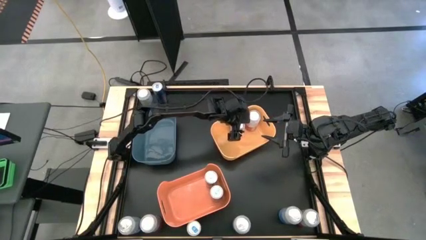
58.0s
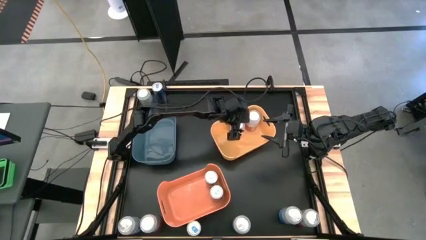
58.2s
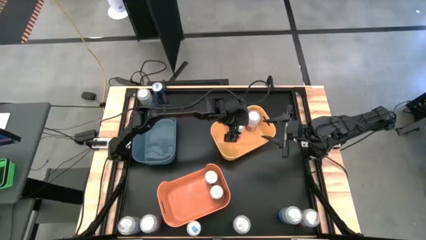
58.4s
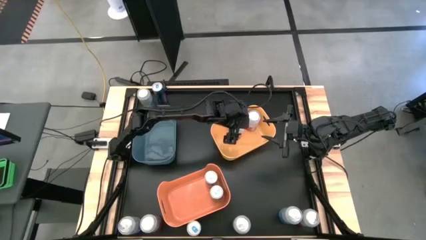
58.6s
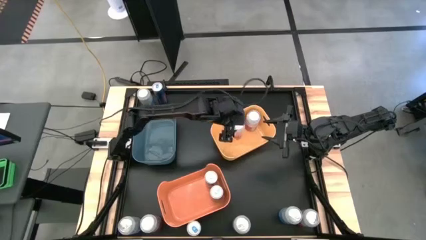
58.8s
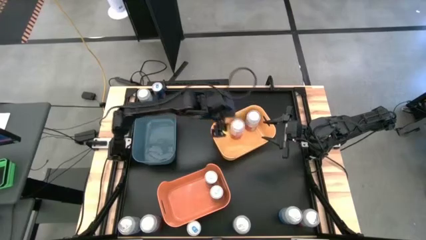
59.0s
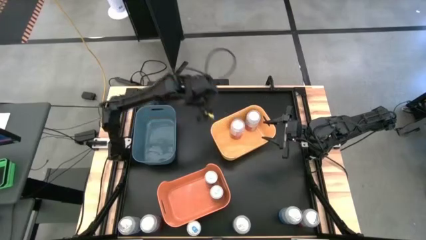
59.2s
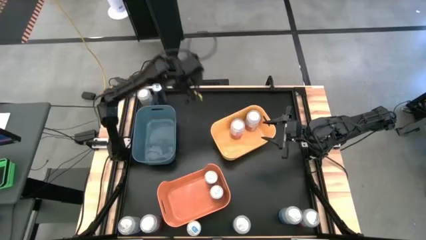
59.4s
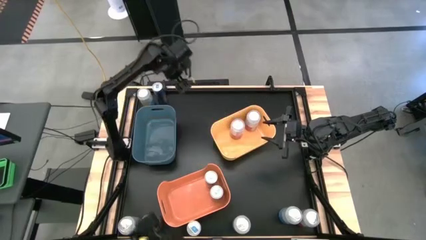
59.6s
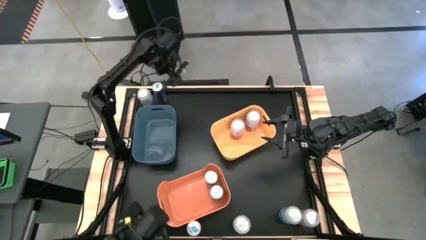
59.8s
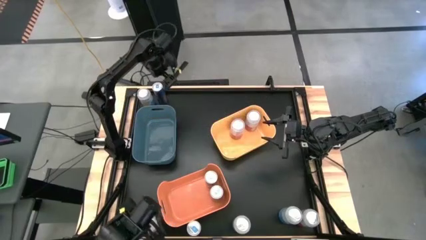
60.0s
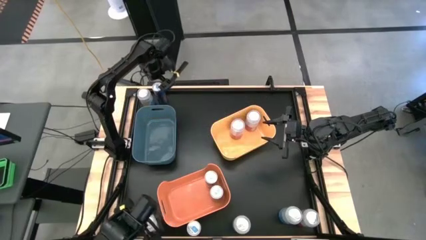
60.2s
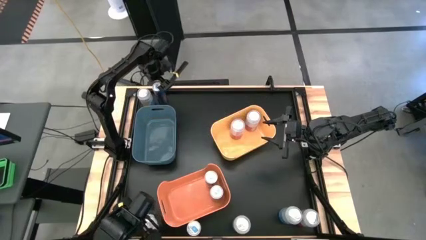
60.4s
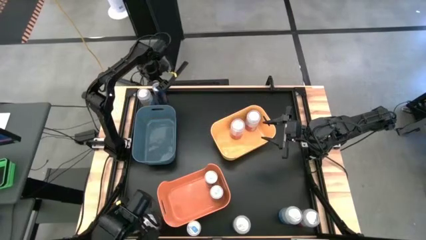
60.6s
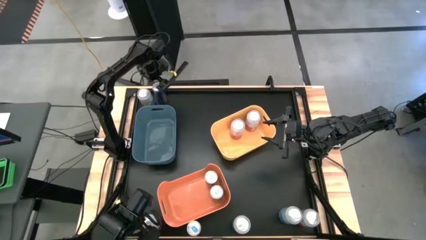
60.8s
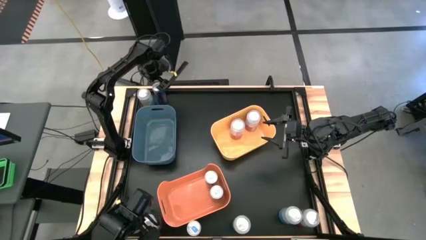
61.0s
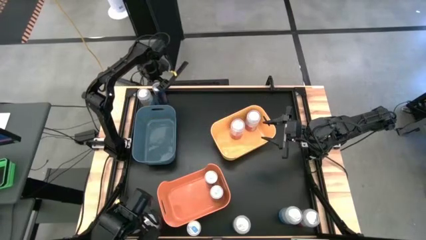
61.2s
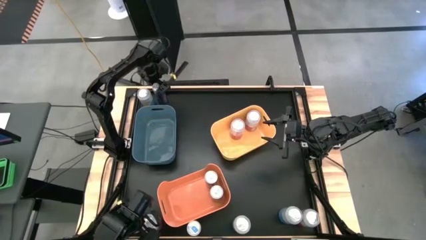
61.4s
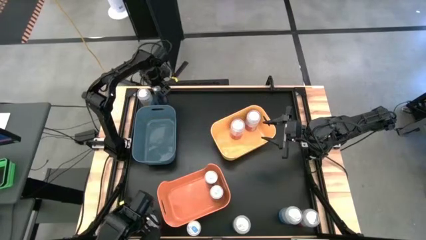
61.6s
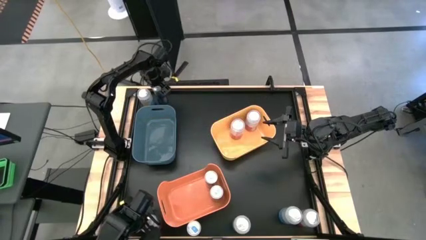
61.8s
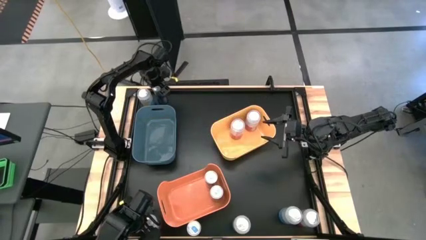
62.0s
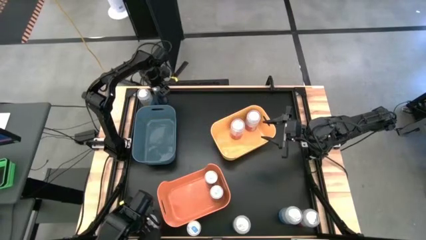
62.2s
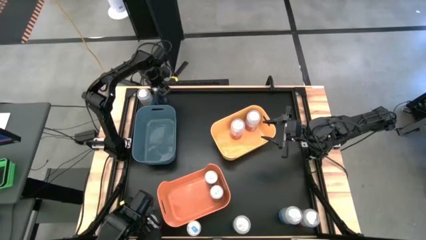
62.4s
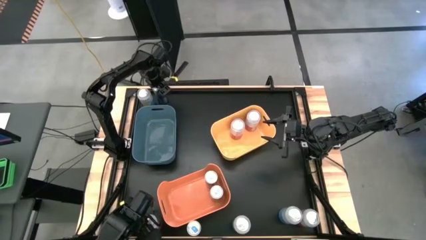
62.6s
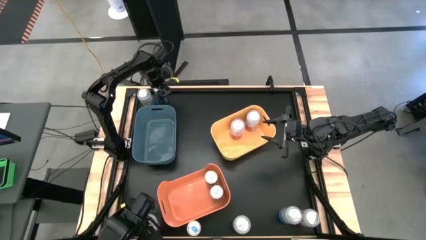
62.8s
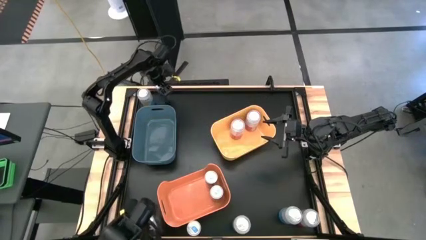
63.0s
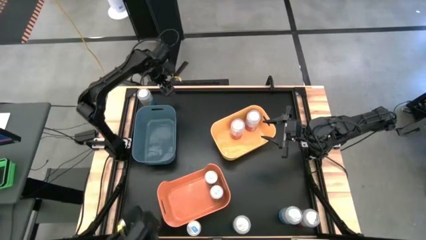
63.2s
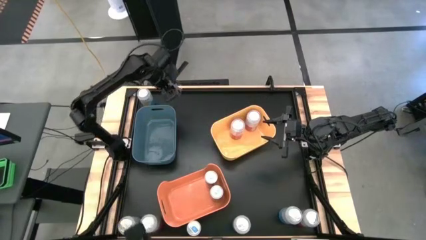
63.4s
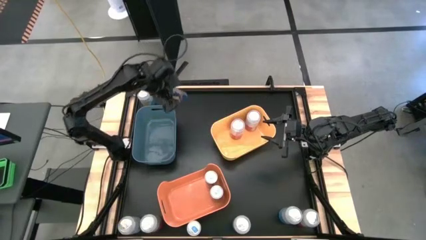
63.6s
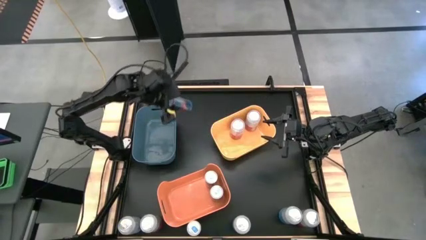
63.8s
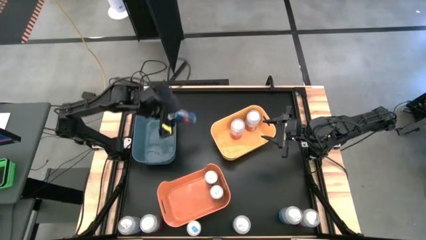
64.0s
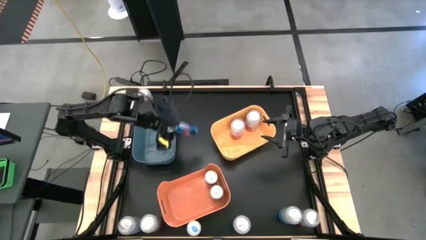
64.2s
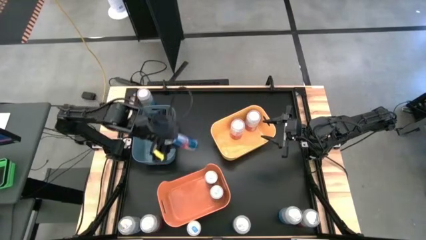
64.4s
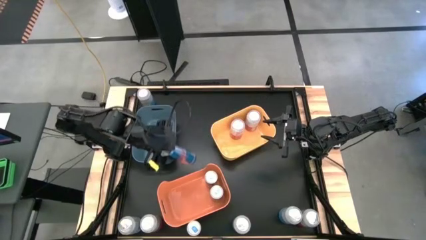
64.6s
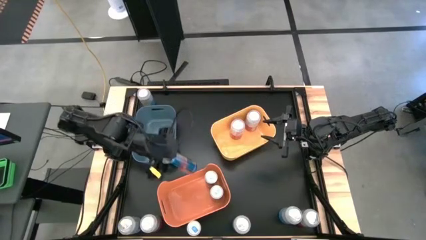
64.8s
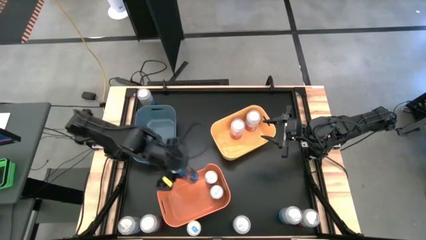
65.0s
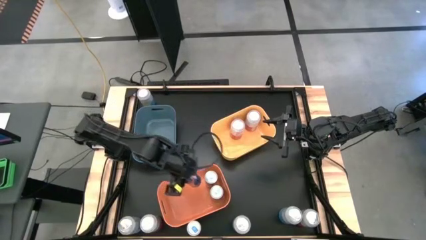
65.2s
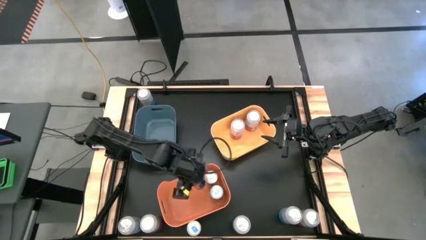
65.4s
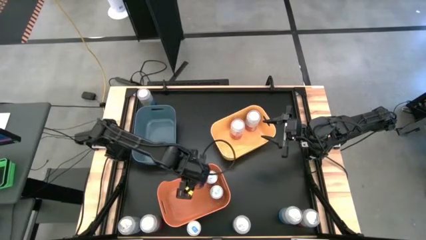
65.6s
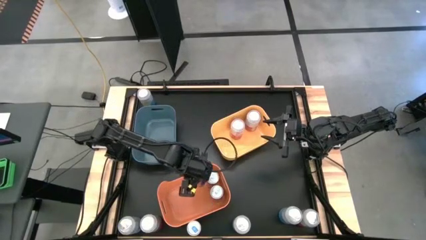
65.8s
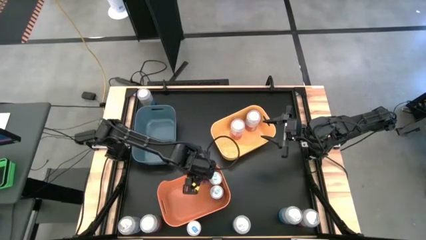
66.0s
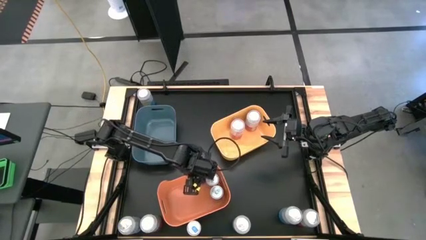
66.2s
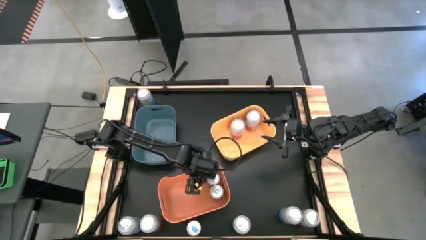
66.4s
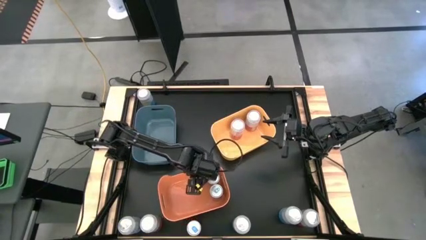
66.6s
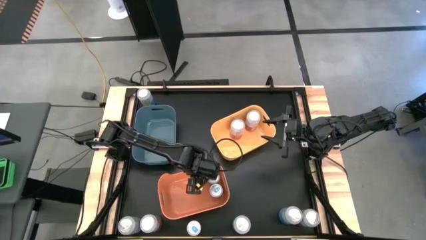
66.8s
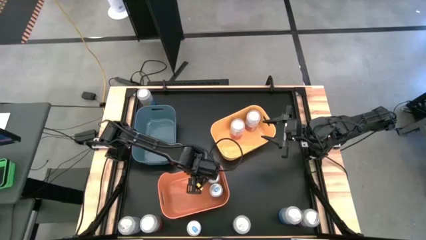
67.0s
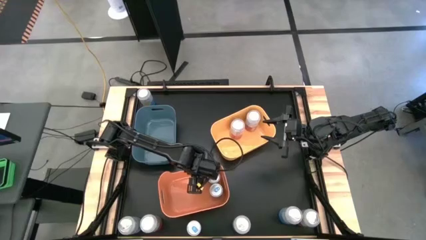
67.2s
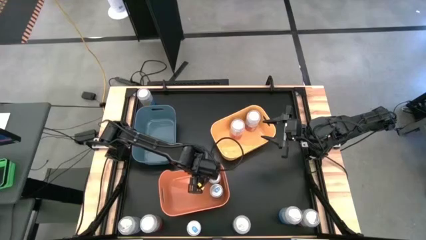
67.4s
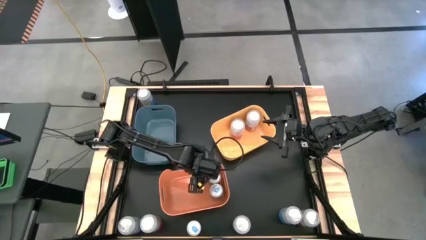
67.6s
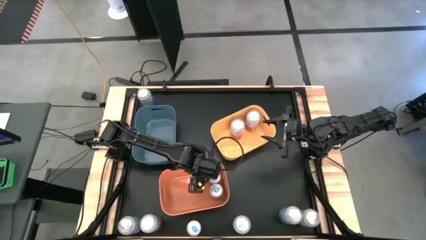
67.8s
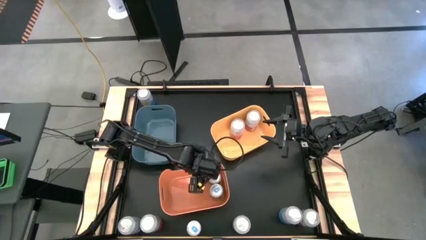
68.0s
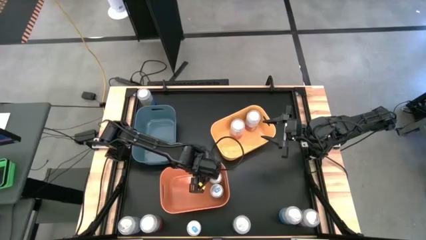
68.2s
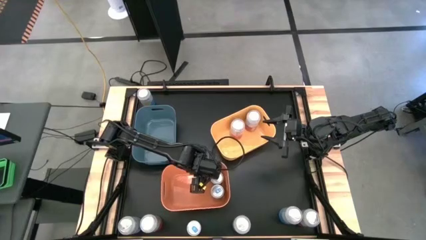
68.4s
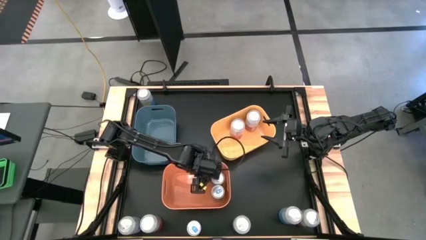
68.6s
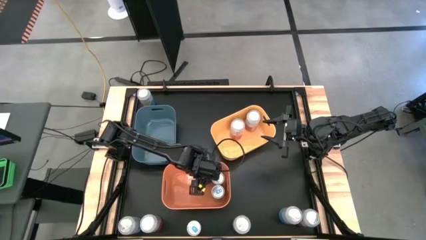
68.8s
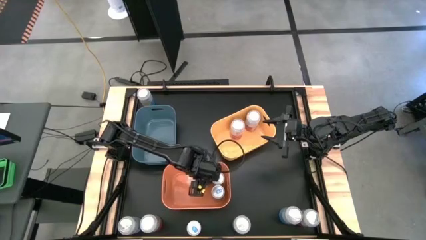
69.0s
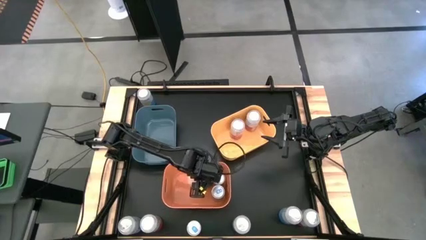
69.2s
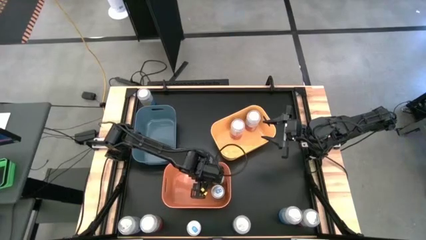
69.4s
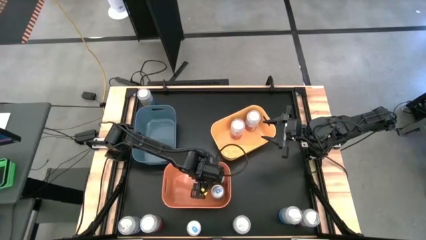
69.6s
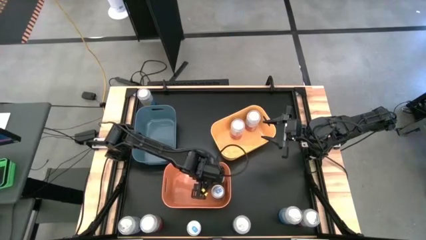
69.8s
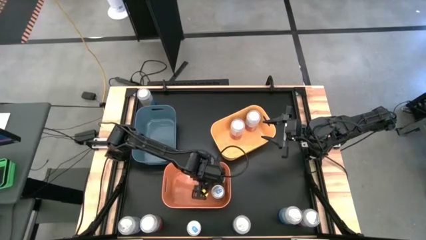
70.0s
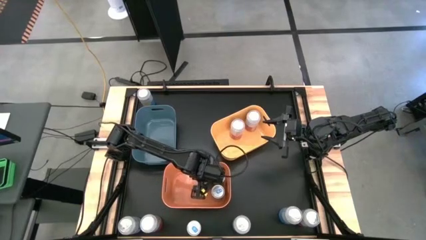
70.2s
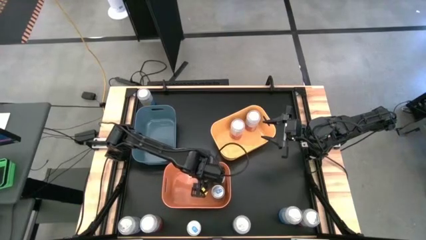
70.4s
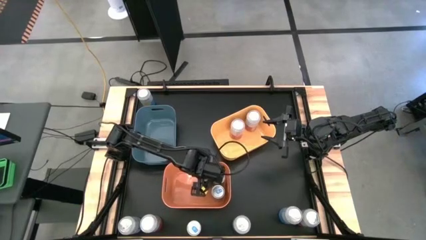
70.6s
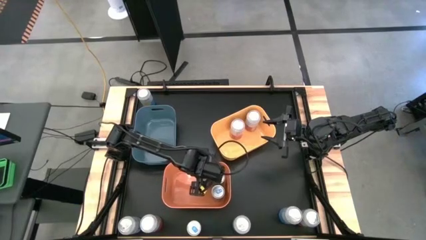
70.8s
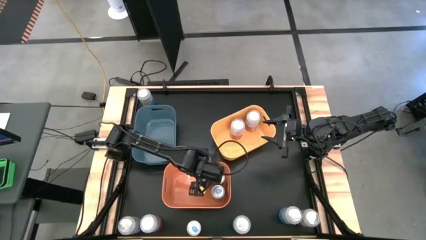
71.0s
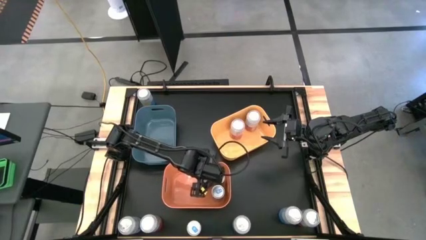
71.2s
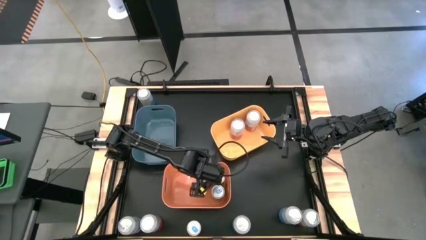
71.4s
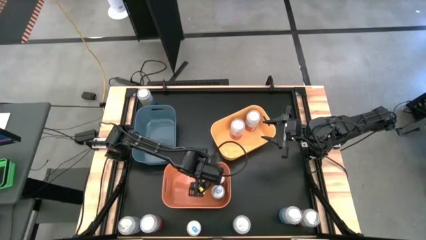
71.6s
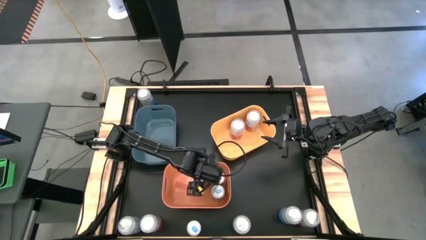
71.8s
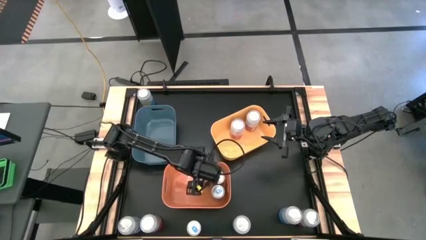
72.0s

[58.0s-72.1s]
Task: Sort soda cans
Put the blue soda can into the orange bin

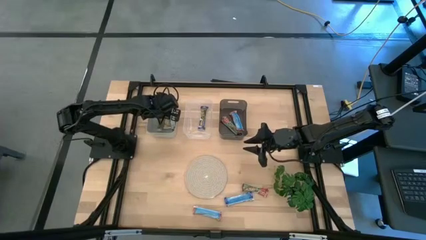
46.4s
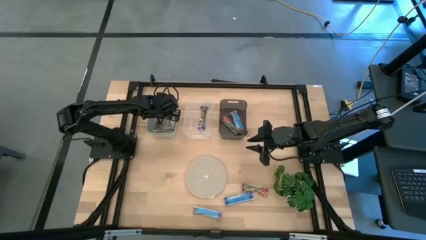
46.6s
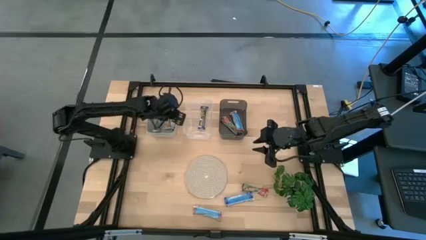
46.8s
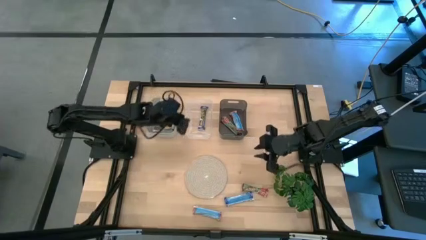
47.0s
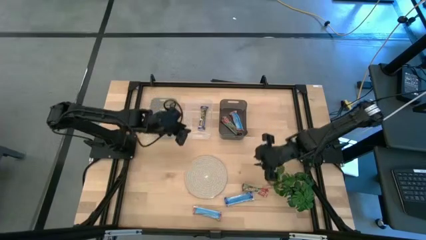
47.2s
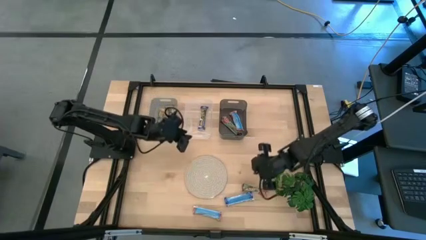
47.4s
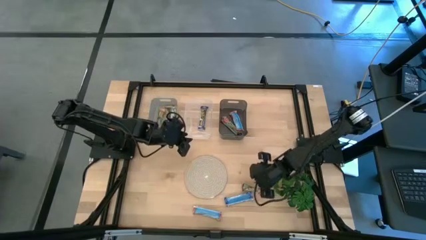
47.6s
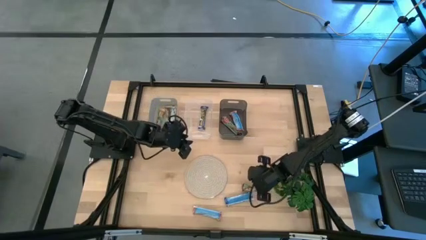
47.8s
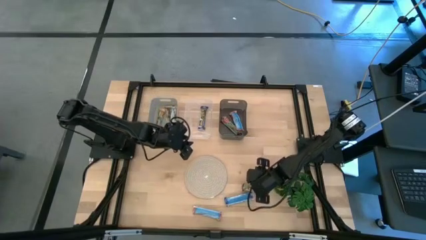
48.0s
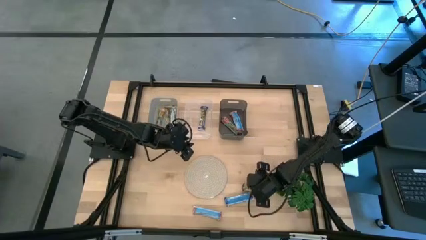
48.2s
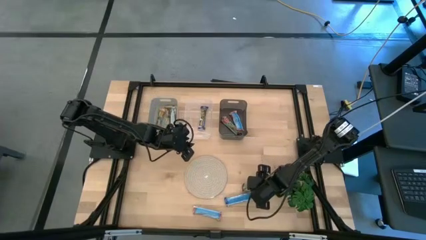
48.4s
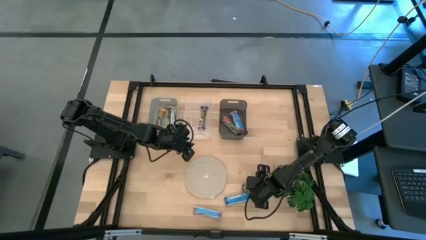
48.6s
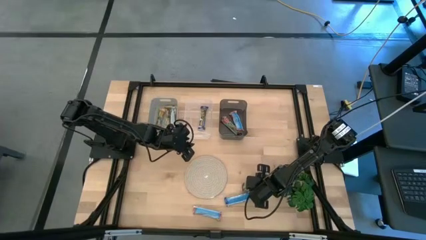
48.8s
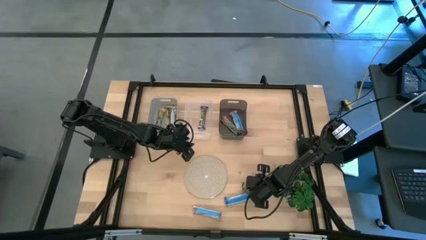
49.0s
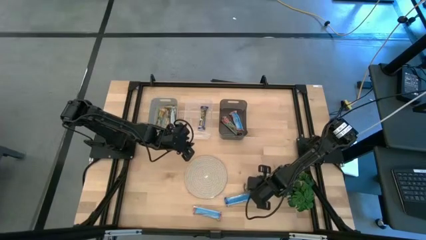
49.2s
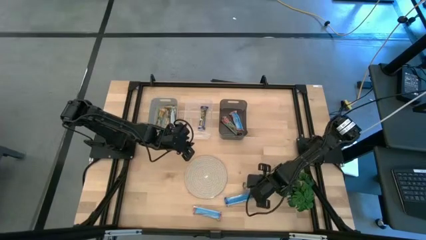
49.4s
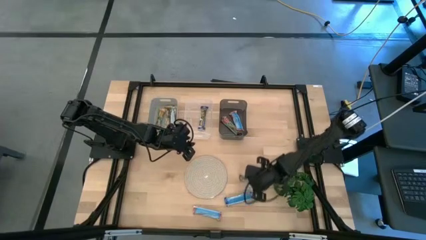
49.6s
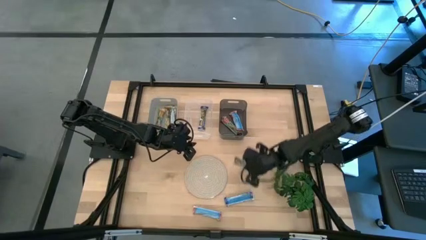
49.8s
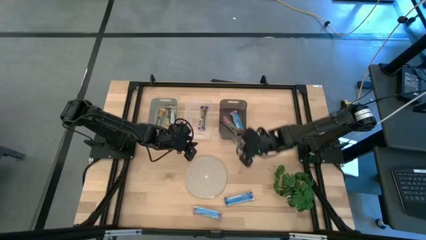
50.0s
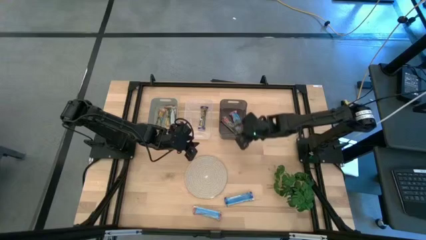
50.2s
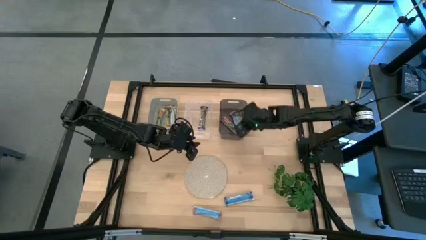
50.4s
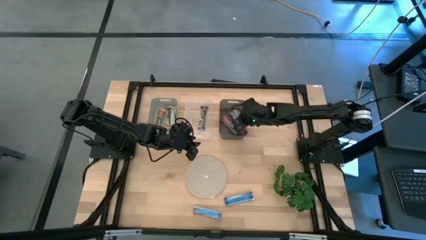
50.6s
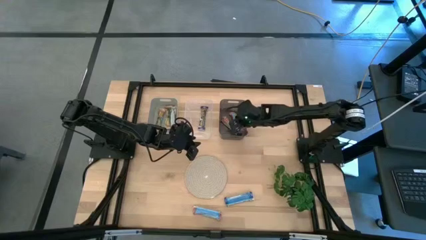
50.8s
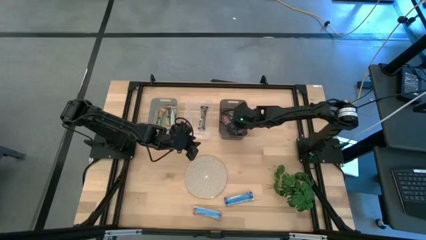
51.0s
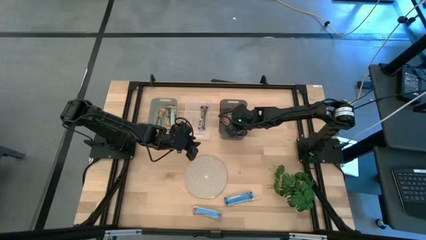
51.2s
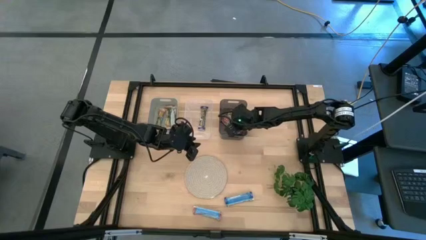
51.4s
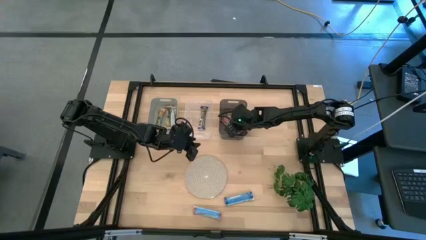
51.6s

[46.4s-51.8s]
Task: Pick and place Granola Bars by type
Put the red granola bar into the black bin
